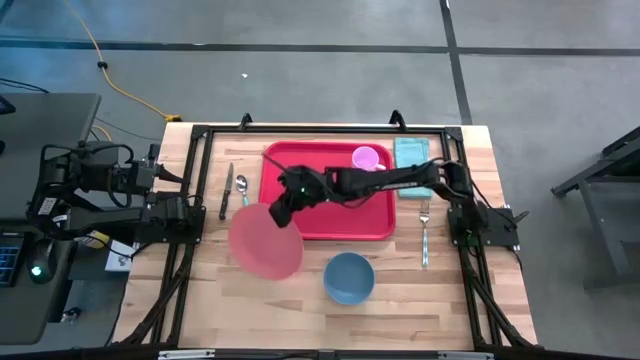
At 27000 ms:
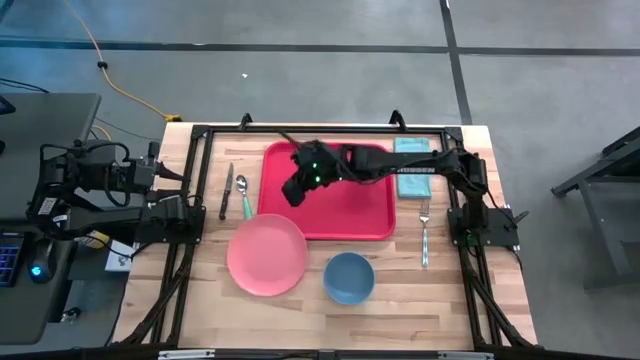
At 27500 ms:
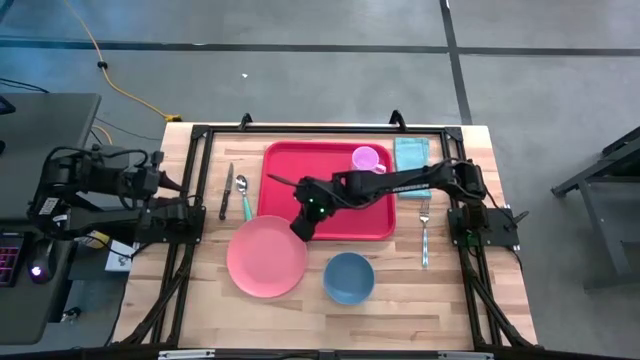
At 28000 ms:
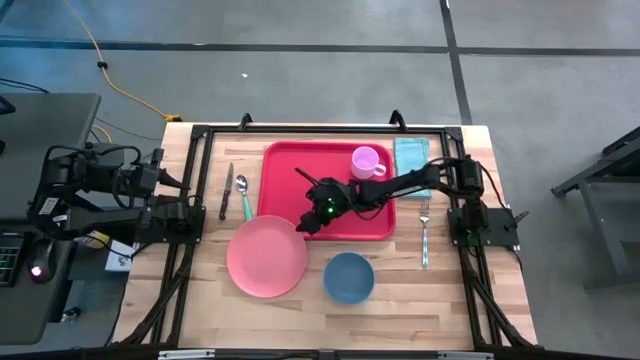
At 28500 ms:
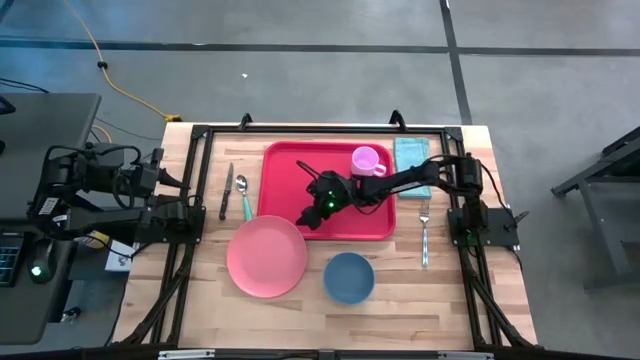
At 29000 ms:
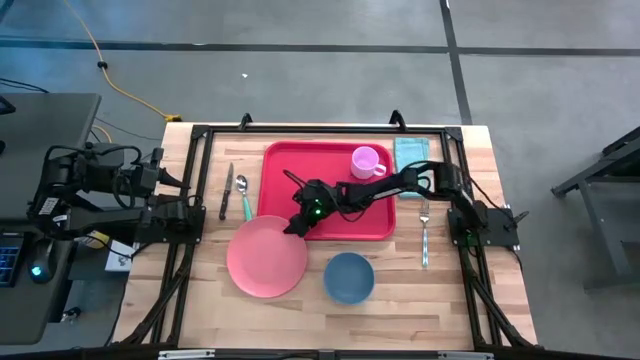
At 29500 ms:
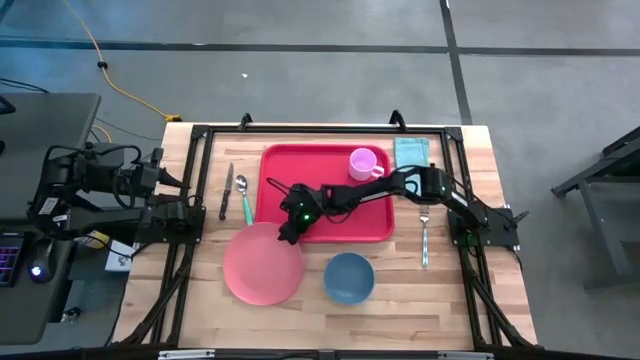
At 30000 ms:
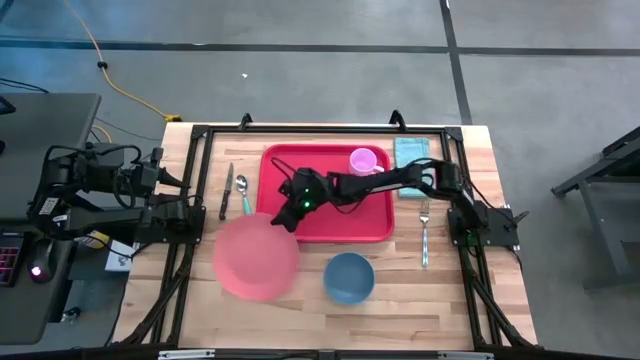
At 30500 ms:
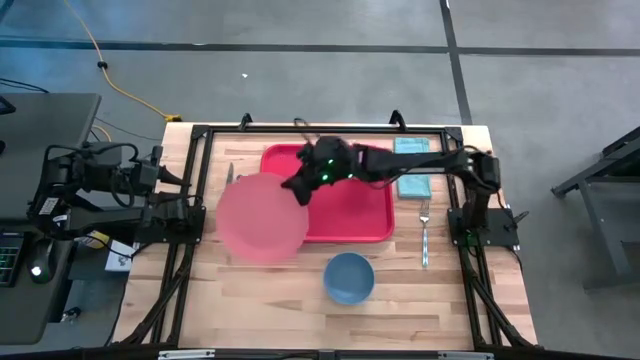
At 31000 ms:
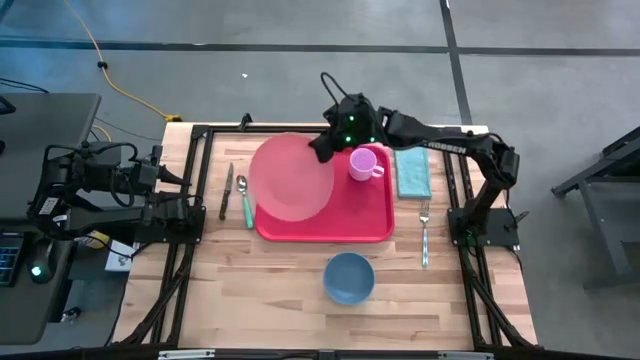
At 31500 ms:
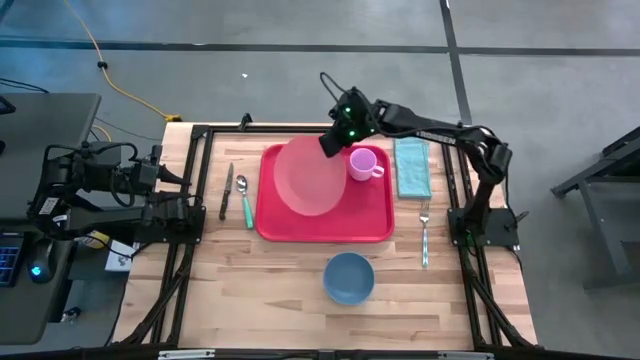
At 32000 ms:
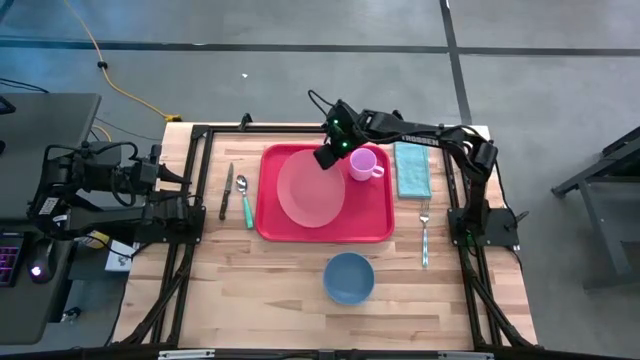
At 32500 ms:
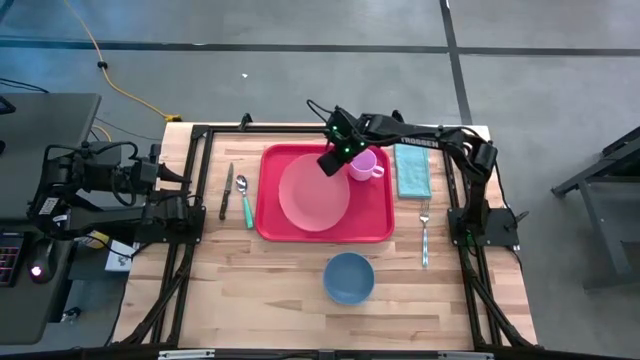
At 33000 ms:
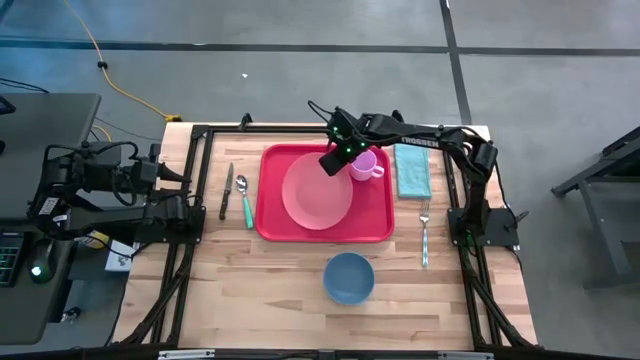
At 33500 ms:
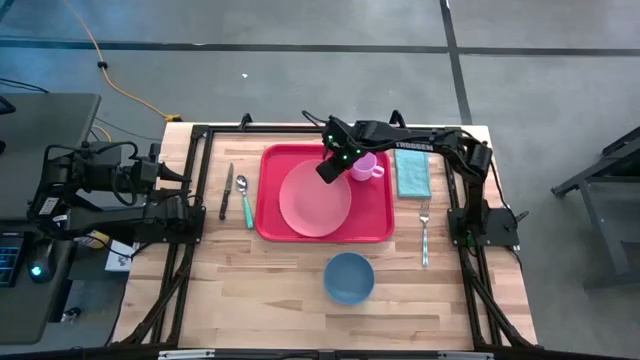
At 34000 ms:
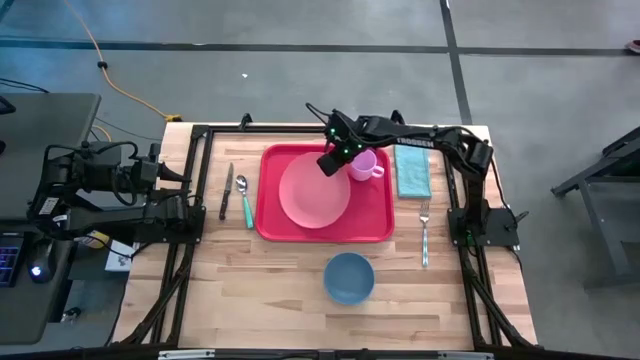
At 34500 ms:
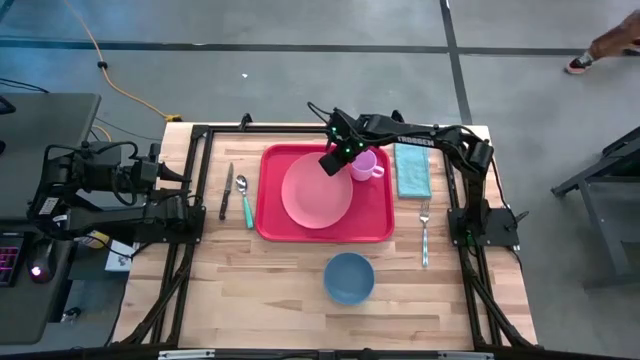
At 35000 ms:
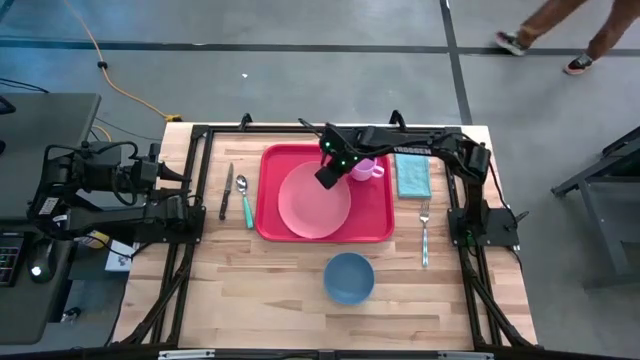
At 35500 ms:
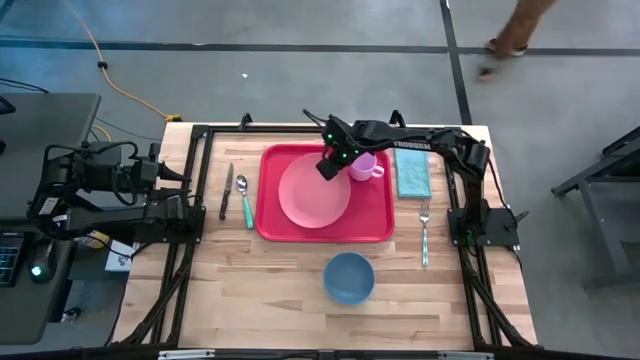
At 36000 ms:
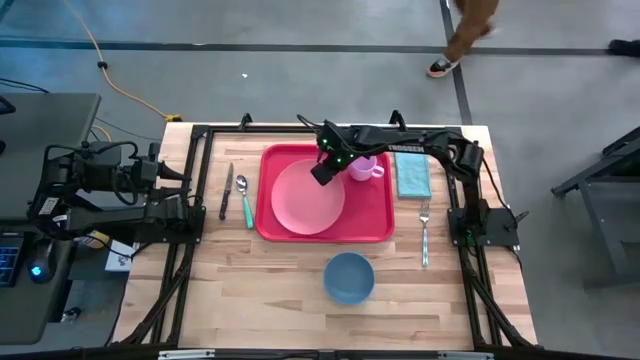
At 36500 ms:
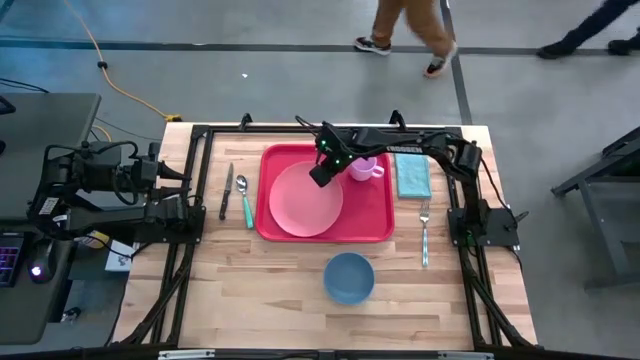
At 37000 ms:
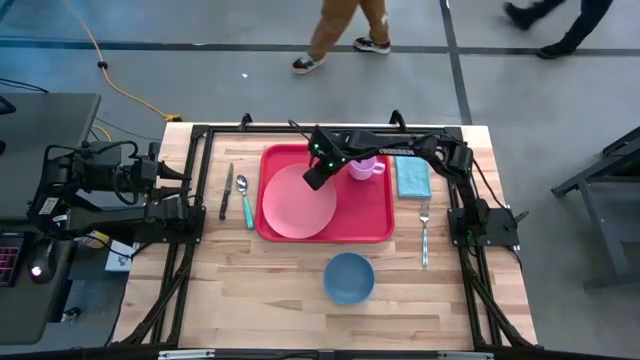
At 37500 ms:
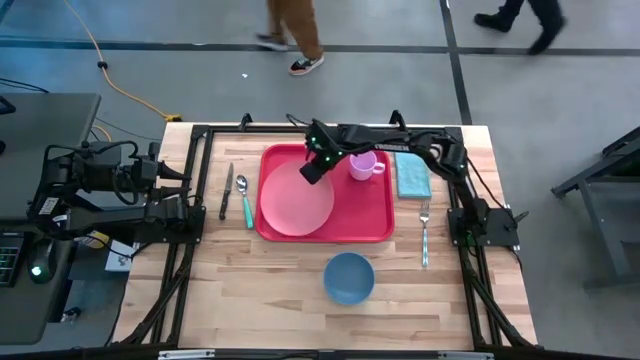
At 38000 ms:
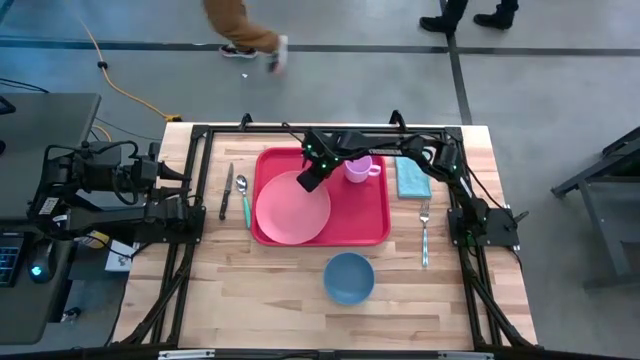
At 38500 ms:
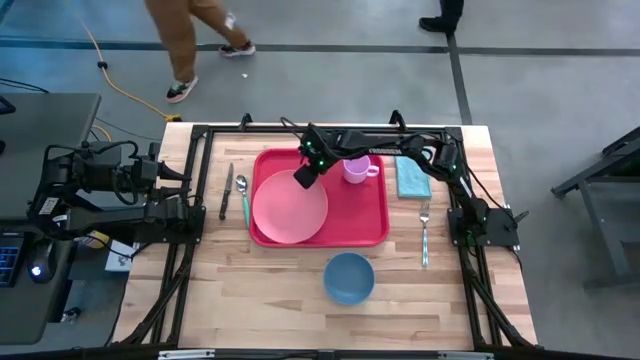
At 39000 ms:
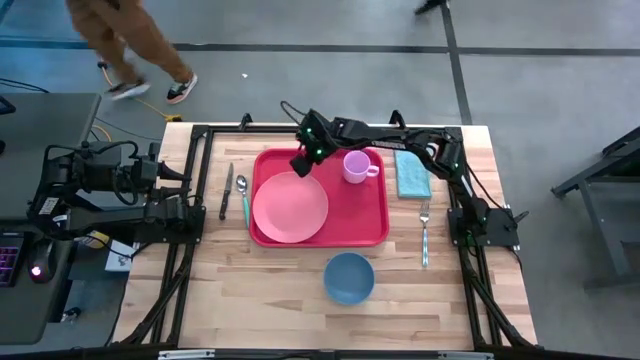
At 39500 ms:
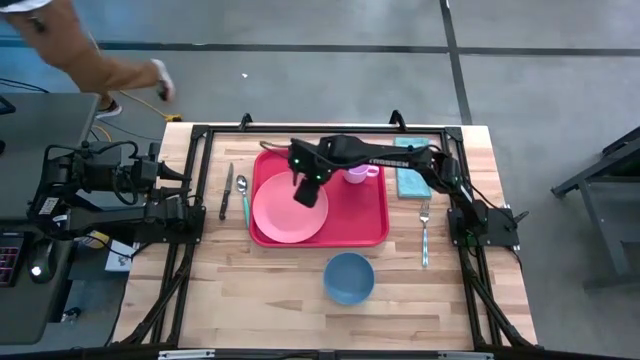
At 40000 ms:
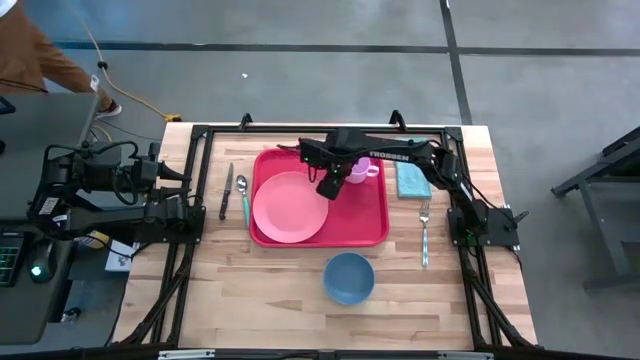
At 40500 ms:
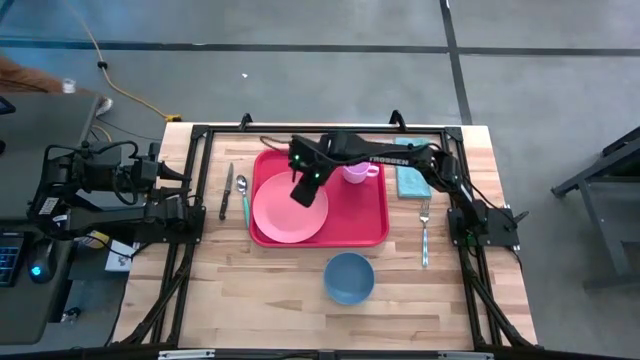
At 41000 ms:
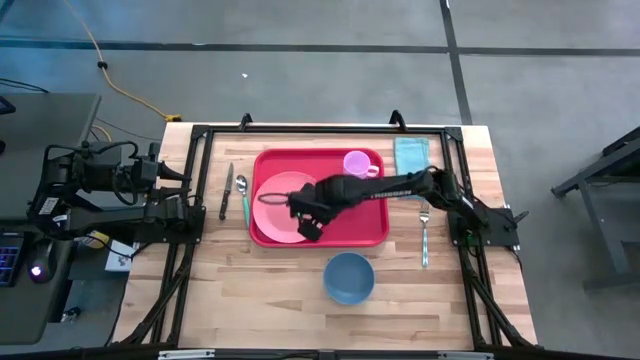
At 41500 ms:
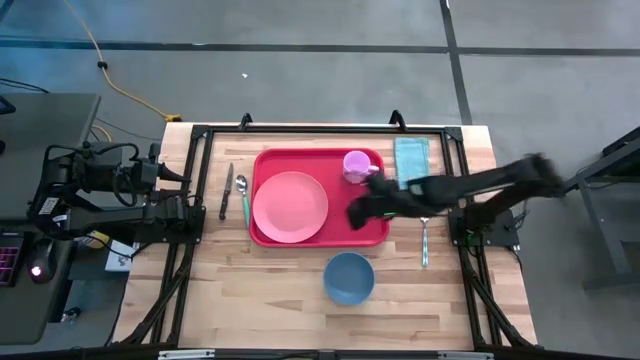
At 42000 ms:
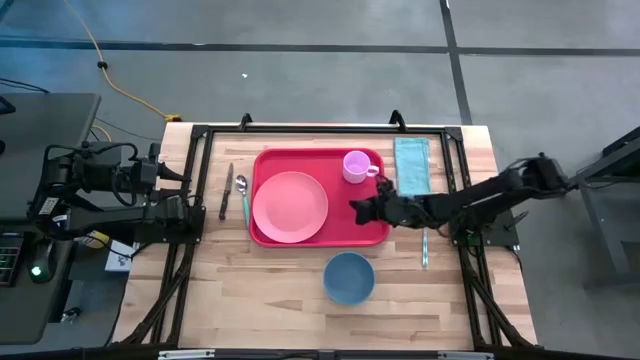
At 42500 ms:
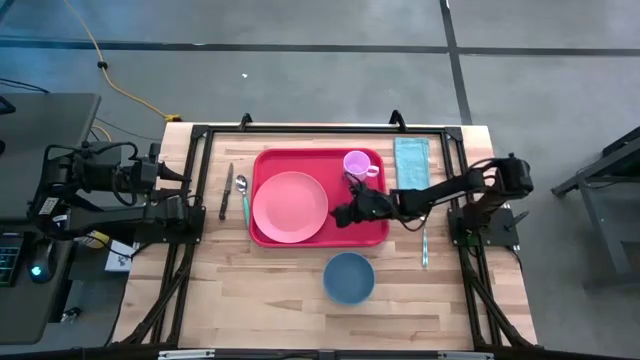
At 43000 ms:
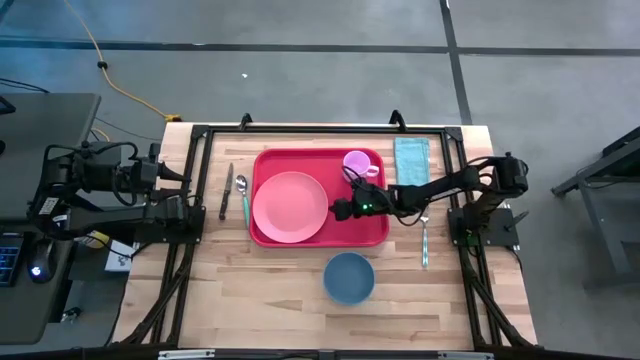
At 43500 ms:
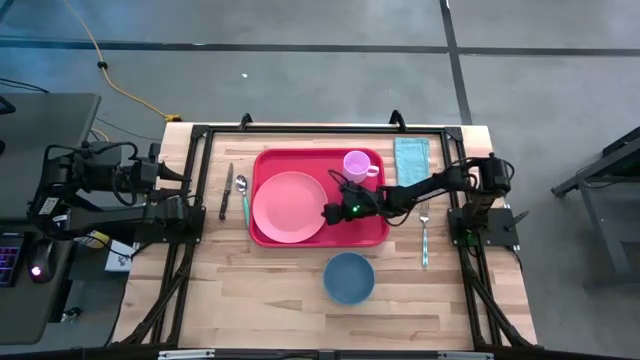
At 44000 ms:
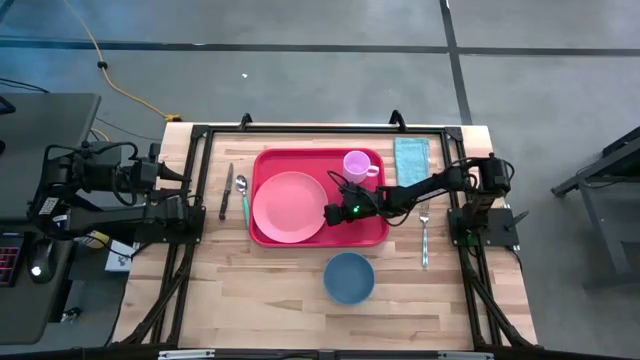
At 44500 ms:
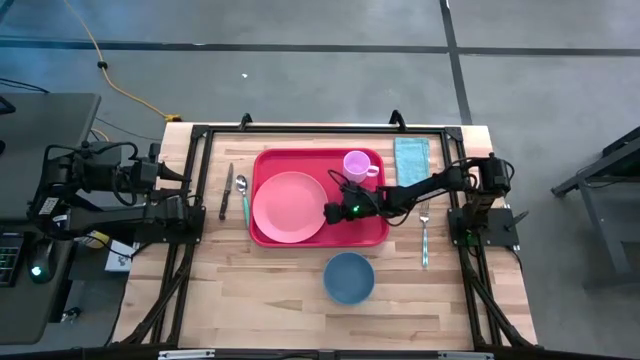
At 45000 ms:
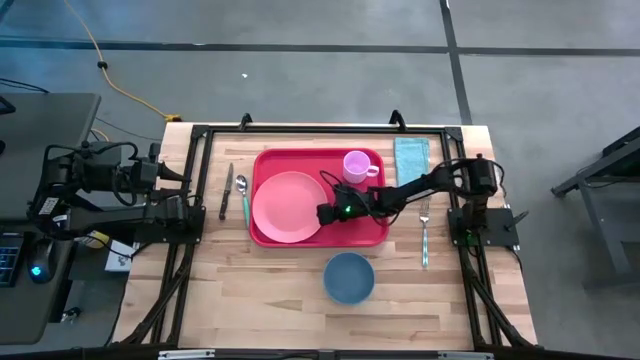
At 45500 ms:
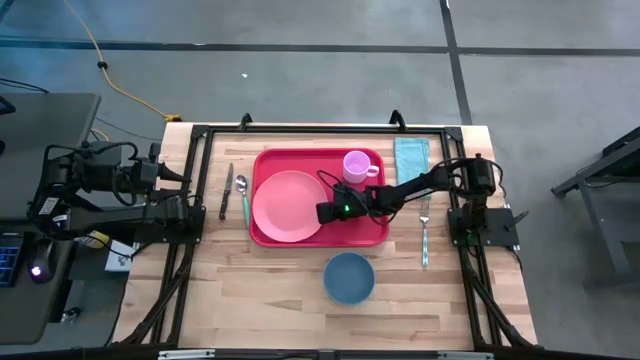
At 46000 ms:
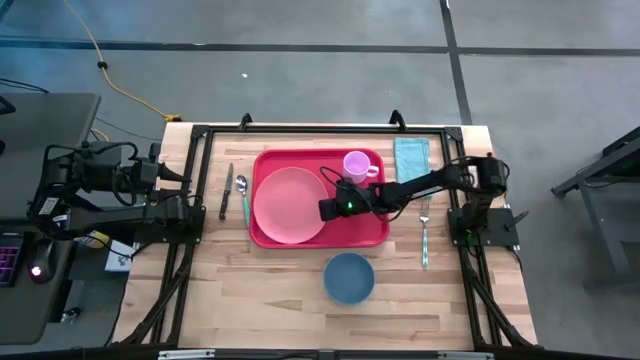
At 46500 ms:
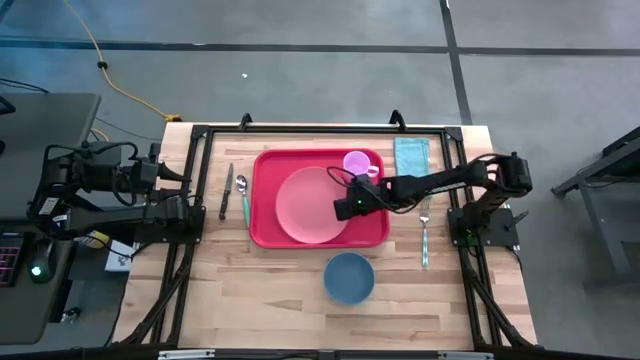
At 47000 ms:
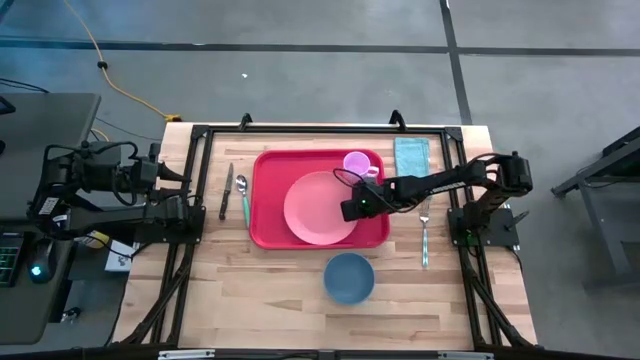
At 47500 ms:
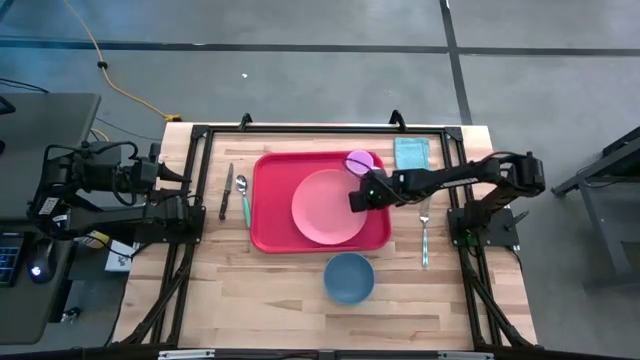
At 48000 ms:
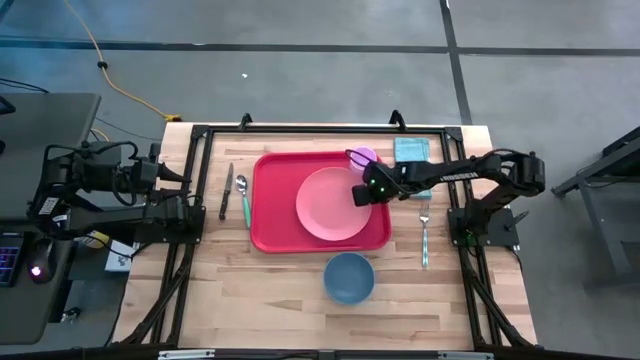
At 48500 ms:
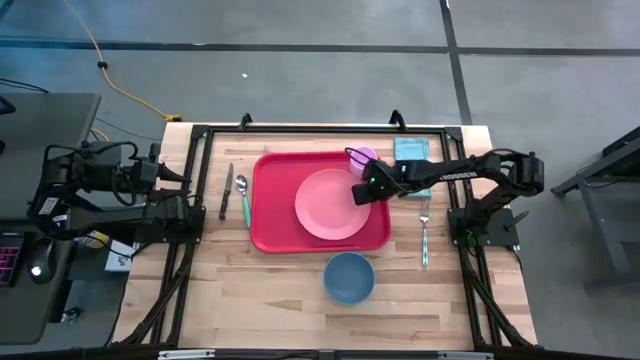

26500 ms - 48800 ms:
Task: Set up tray
Put the pink plate on the tray
